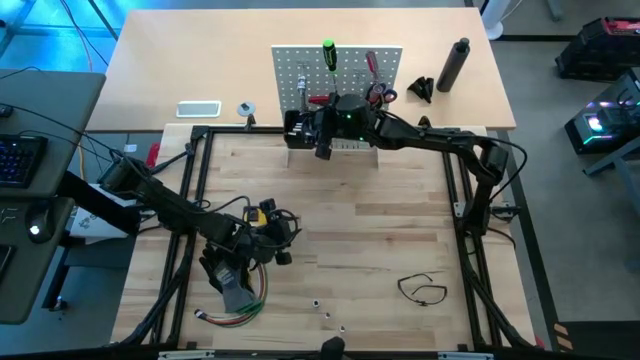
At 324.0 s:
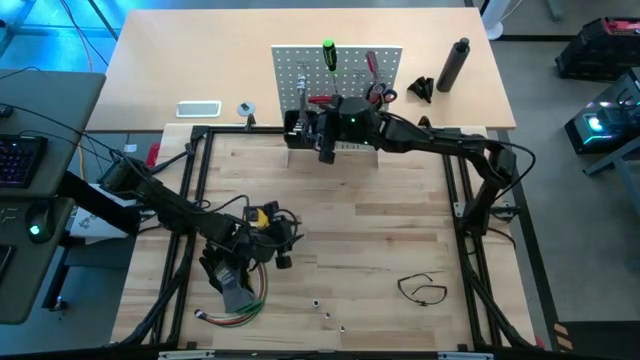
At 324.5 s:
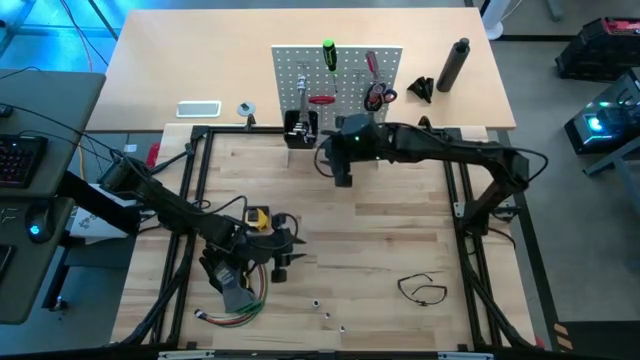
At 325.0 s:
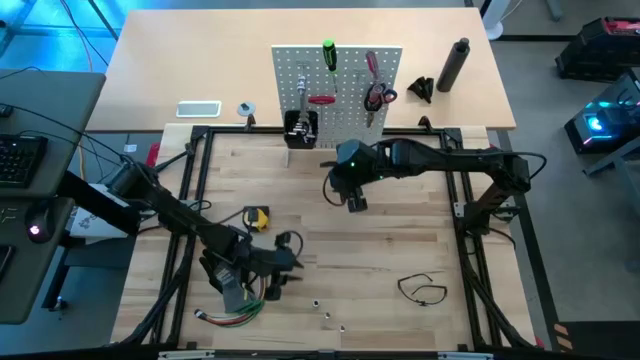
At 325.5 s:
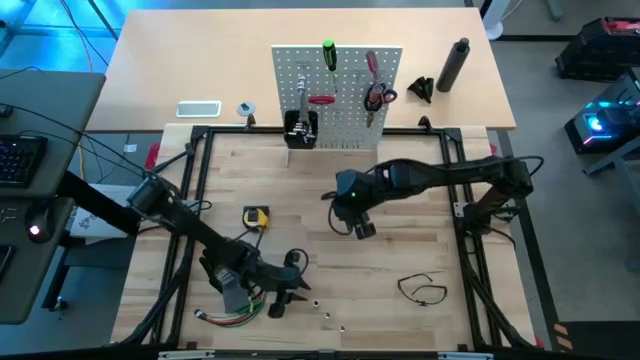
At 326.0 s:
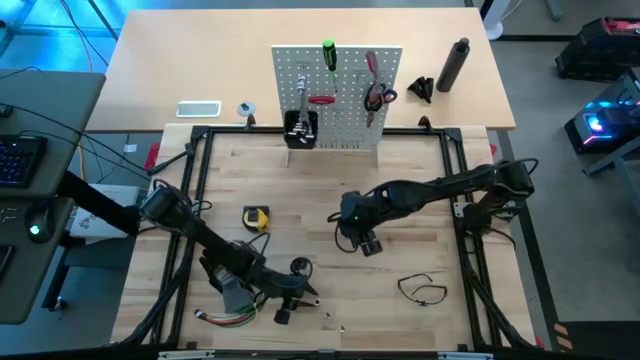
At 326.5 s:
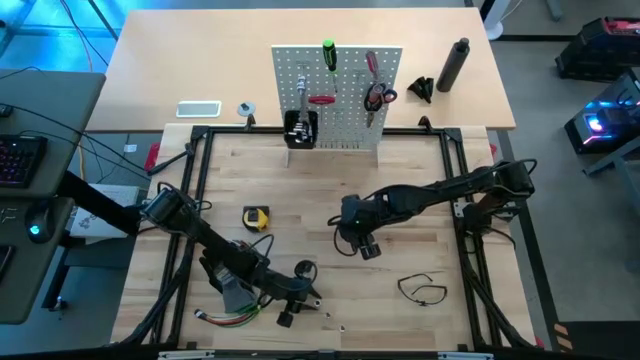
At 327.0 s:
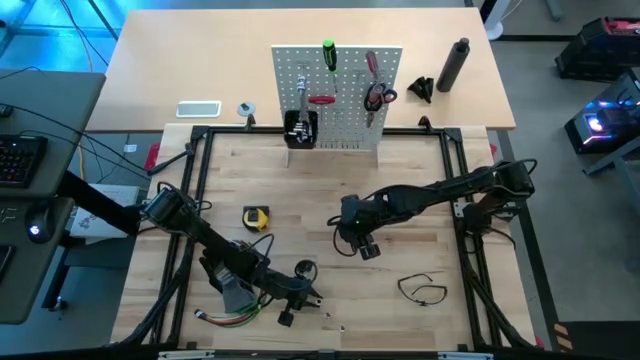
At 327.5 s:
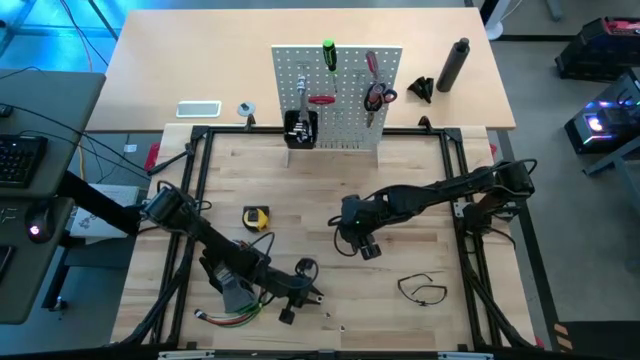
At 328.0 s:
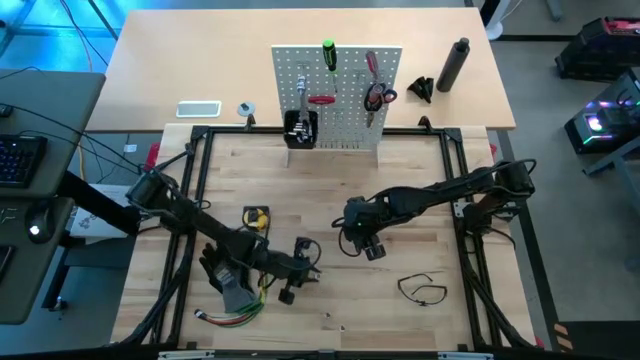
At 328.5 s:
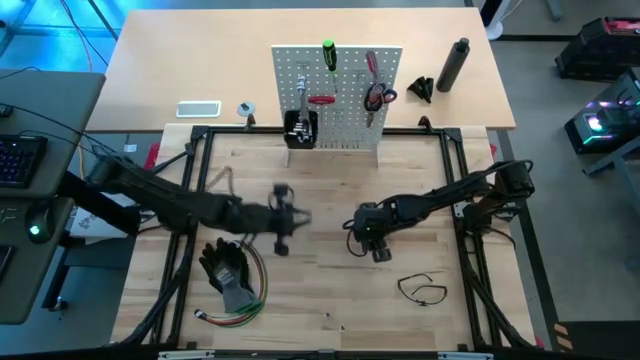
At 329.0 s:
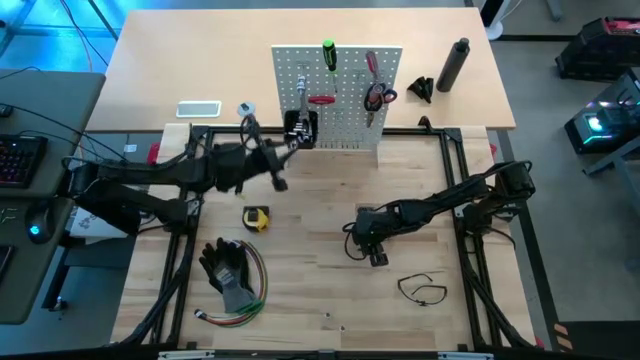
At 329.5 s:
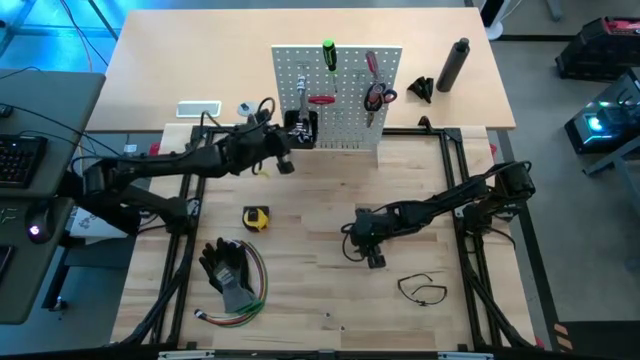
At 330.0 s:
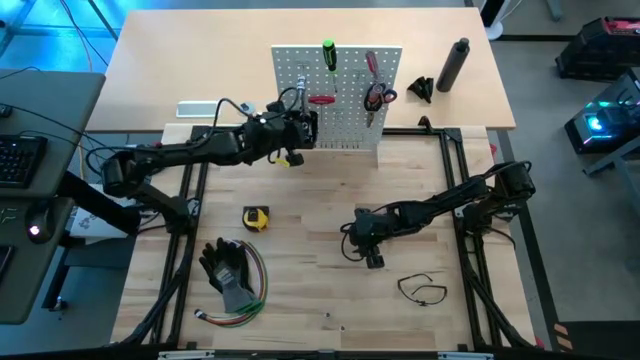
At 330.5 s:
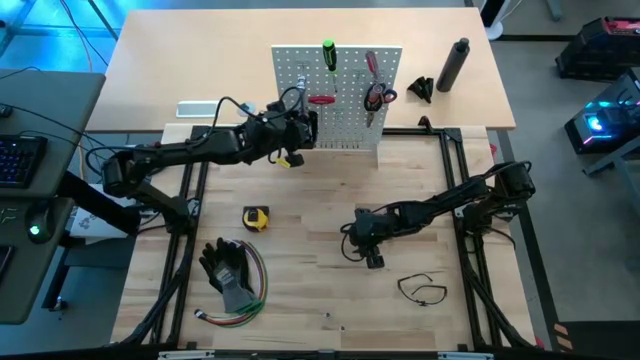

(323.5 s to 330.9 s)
Task: Hang tools onto peg board
Put the silver socket into the black bin on the white peg board

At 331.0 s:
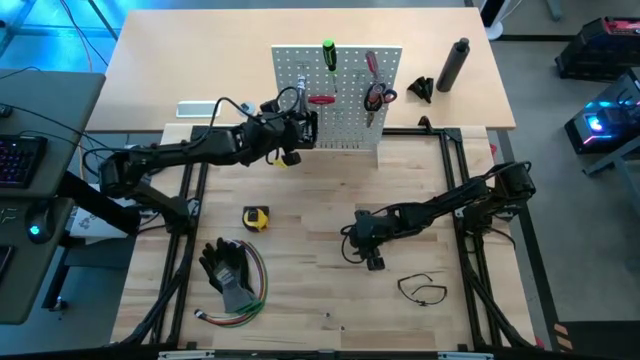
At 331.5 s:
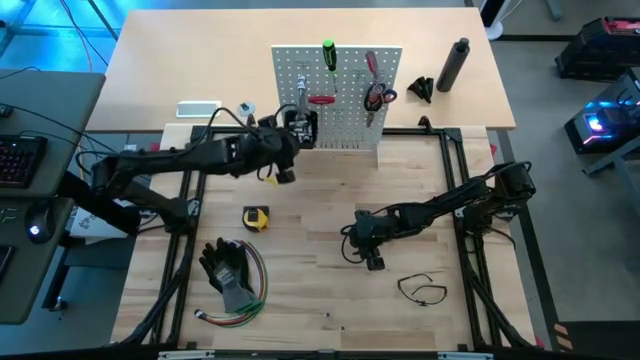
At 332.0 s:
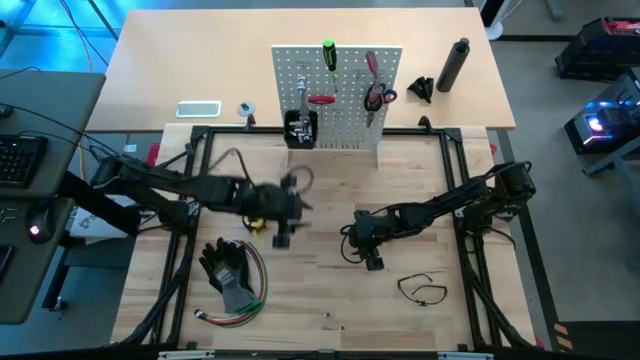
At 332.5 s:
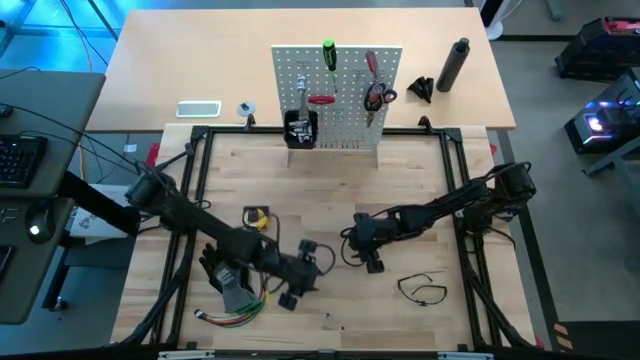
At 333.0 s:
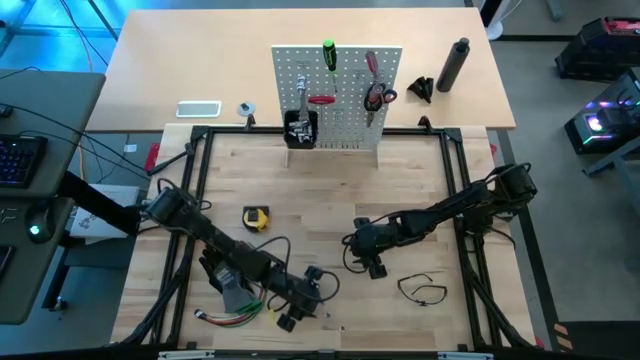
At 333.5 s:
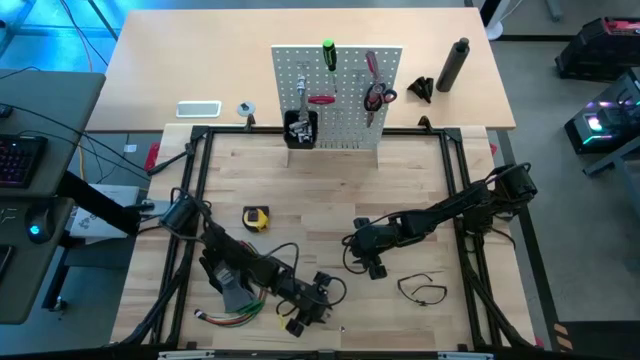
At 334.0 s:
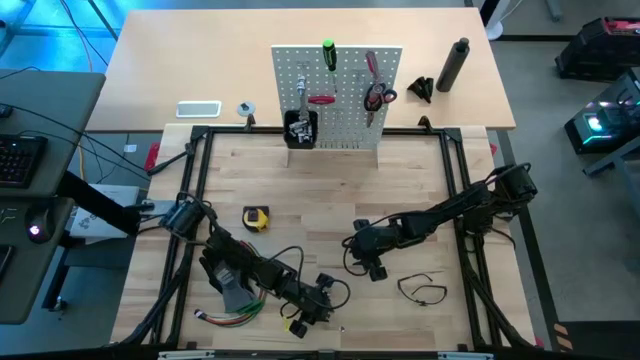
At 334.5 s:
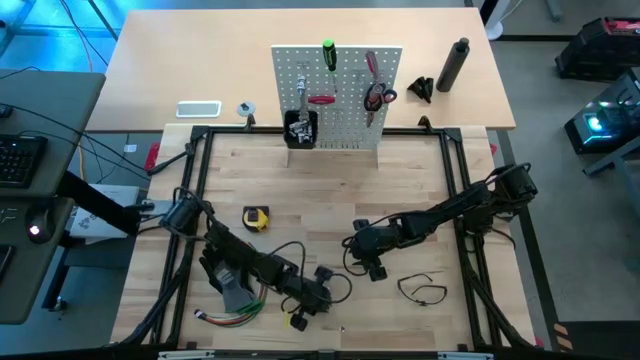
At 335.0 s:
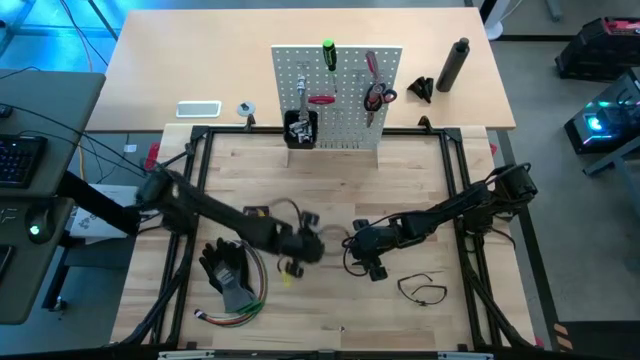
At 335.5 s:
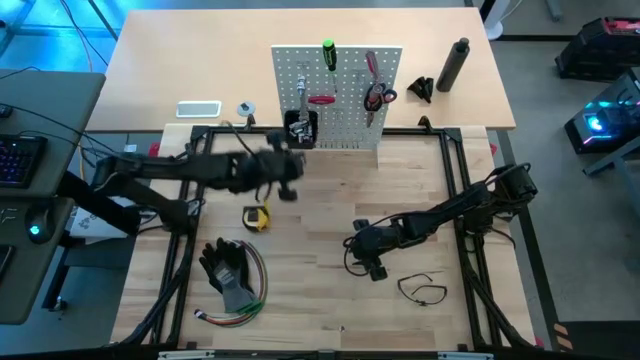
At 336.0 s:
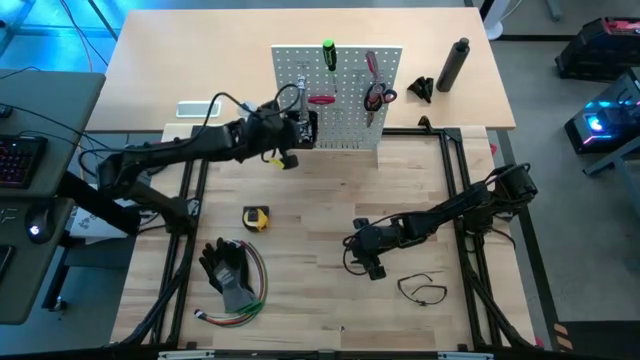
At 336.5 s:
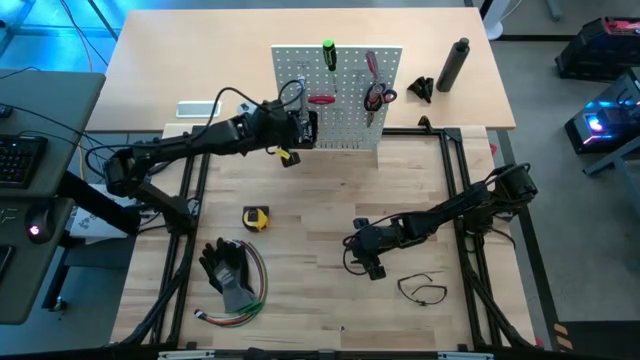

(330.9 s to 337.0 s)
Put the silver socket into the black bin on the white peg board

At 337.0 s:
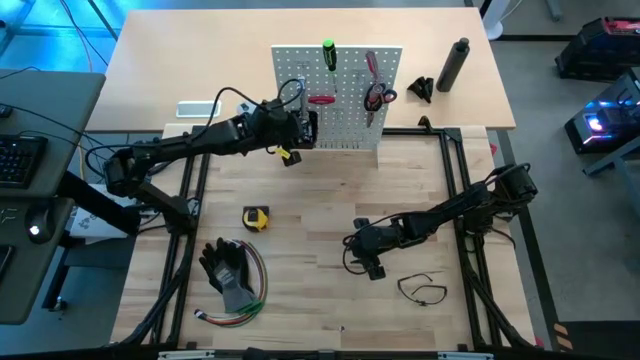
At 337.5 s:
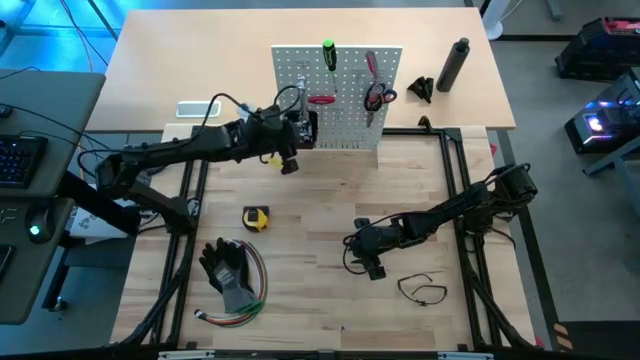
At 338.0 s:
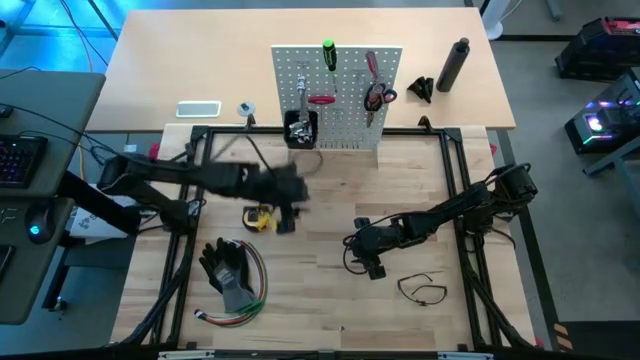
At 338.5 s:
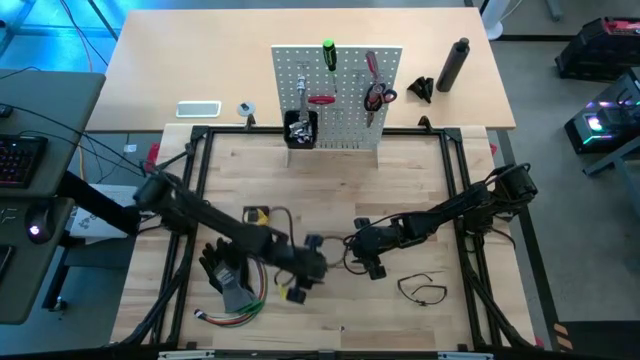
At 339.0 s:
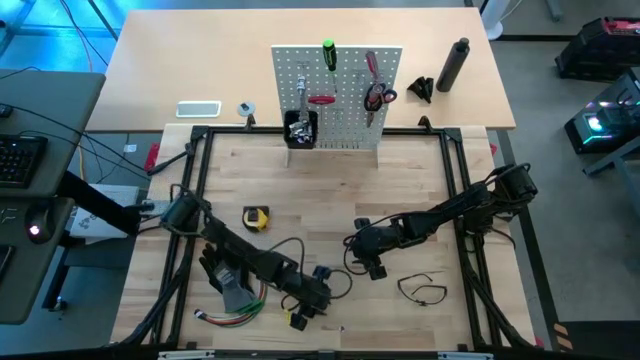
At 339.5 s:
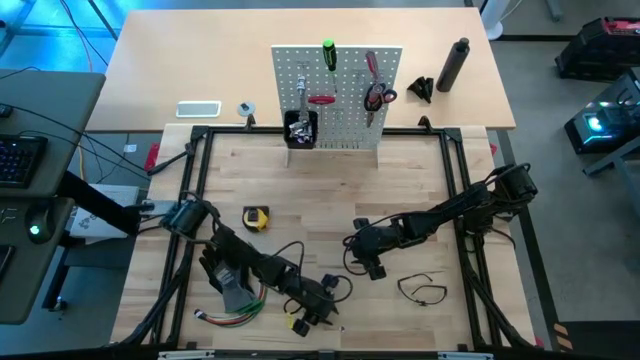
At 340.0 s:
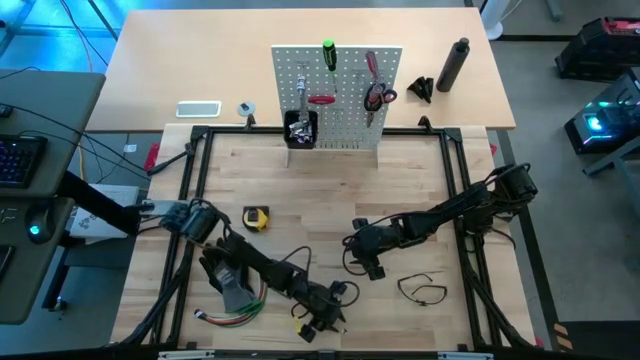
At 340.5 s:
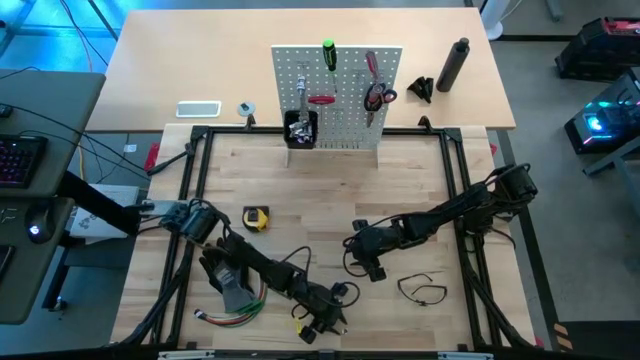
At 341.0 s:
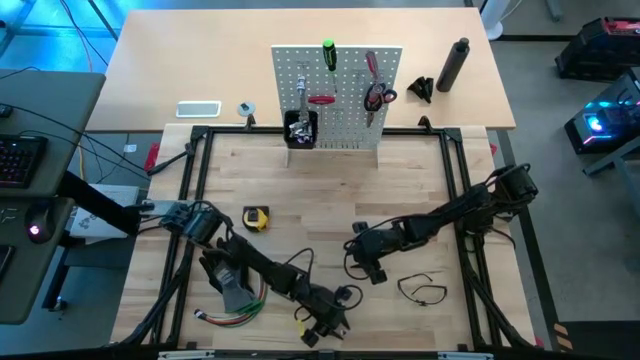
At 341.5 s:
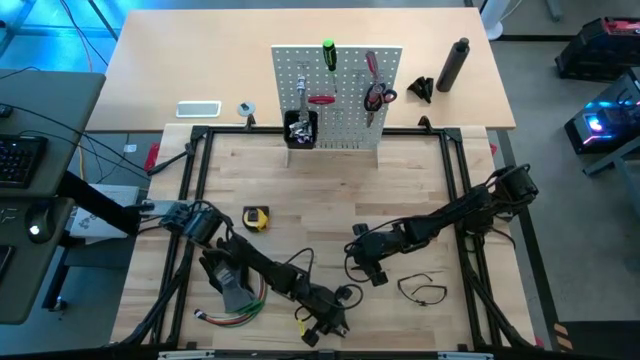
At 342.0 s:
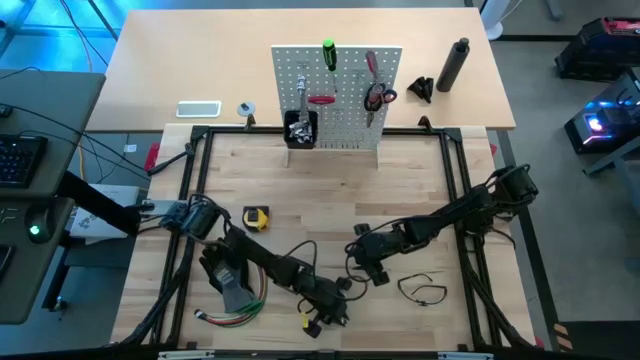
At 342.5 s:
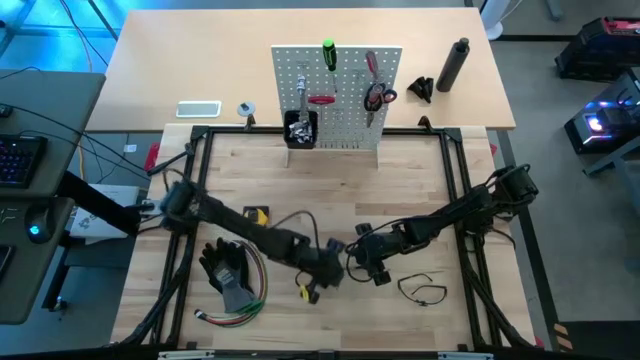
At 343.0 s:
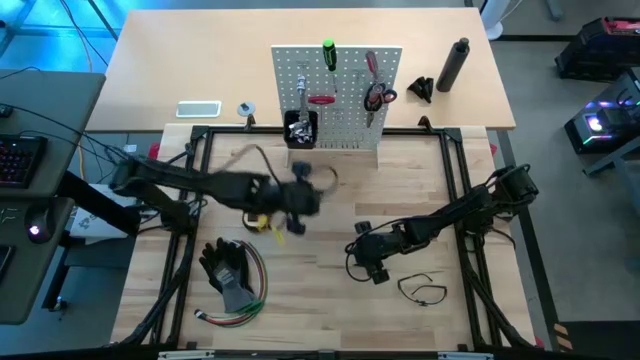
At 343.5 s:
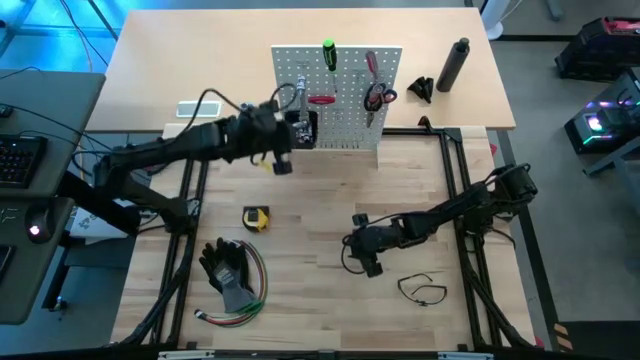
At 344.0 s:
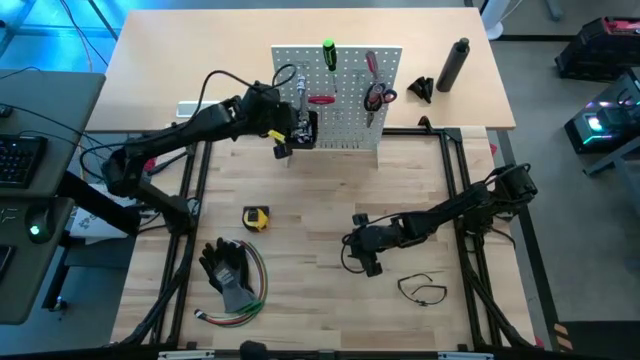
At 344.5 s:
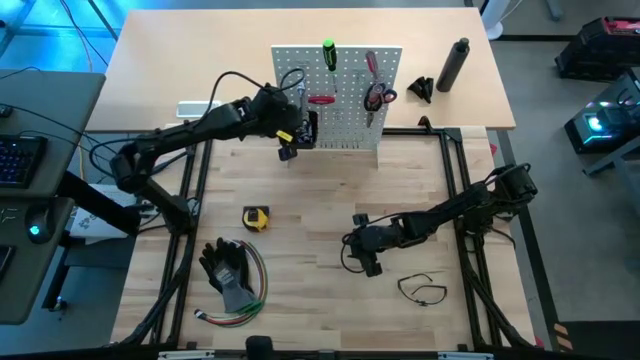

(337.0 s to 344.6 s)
Put the silver socket into the black bin on the white peg board
